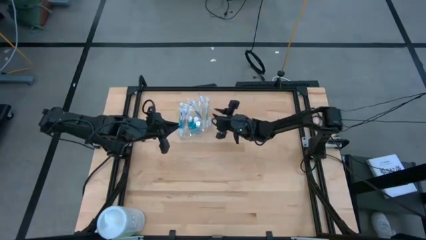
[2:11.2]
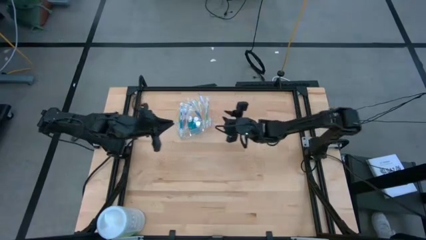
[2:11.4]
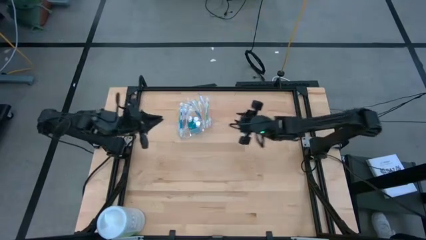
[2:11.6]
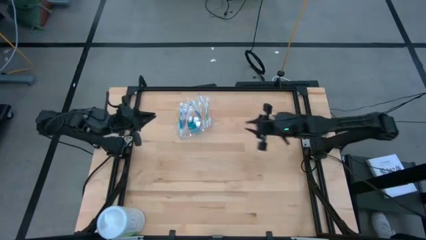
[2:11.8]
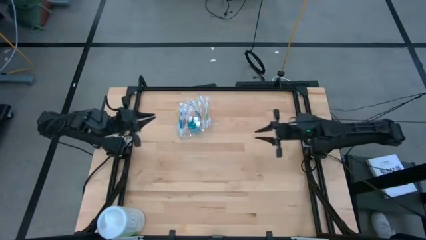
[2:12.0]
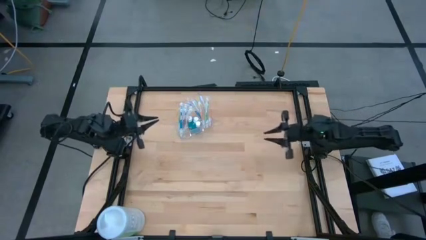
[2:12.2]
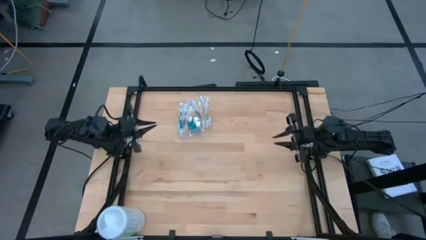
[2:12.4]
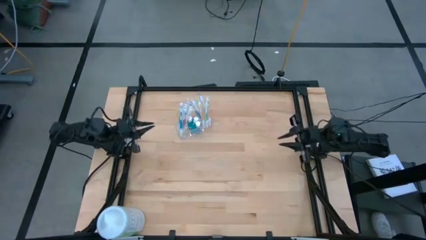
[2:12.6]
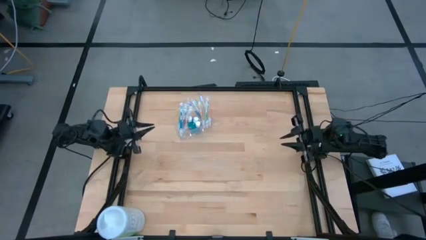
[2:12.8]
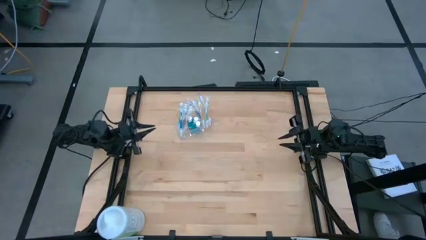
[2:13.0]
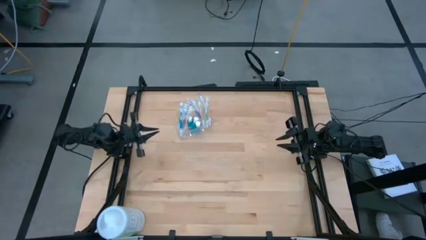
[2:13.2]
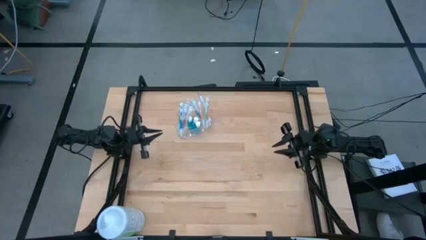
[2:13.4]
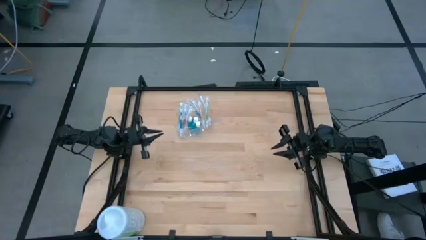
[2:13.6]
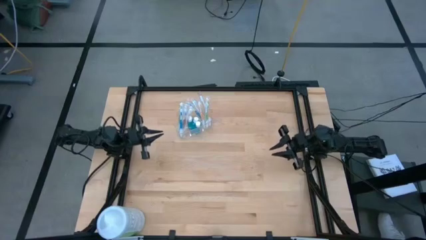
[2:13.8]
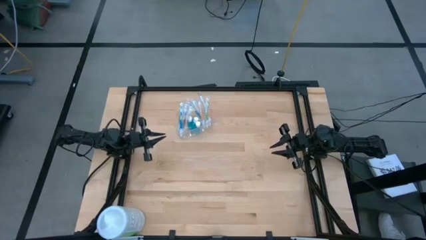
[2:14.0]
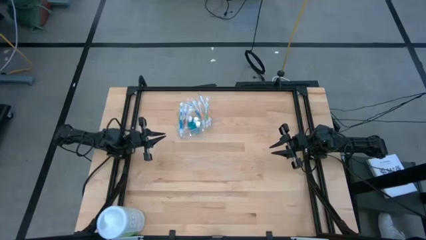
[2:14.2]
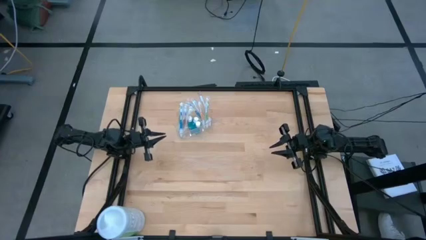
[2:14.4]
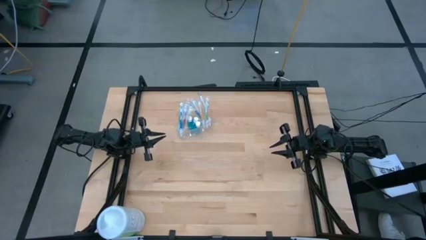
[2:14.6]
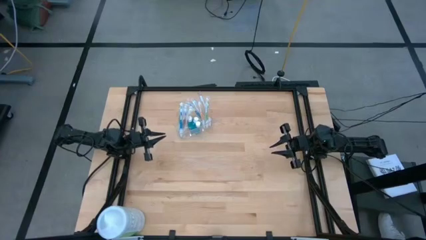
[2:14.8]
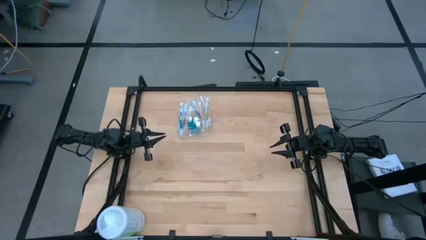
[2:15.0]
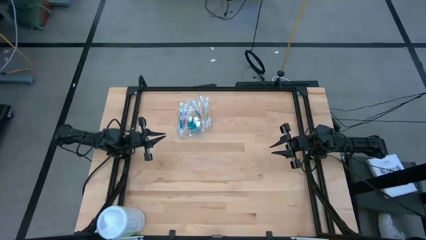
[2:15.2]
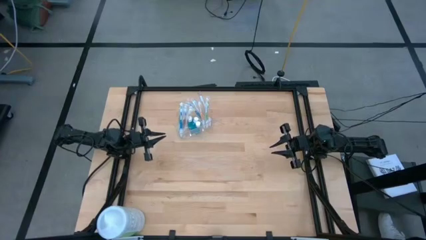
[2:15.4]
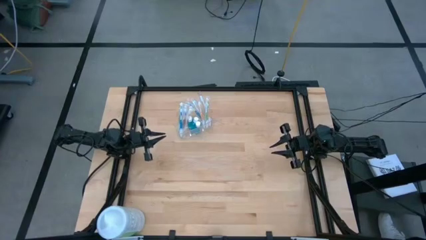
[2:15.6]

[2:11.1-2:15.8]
Task: Pick & Place toothbrushing station
Return to Home Position

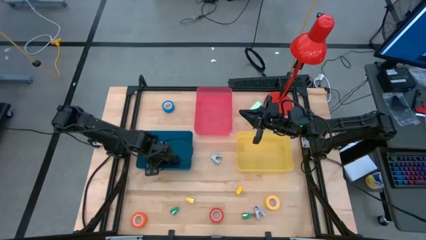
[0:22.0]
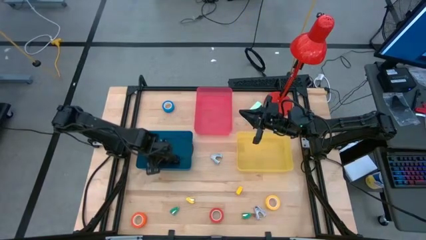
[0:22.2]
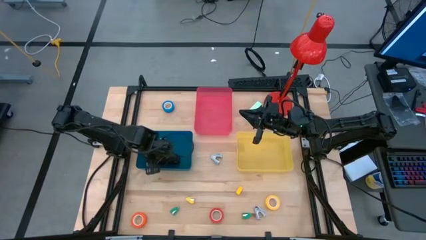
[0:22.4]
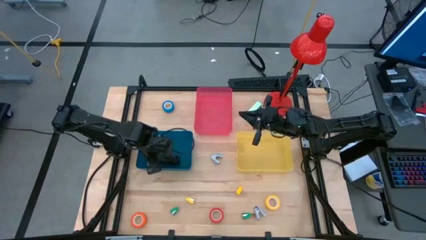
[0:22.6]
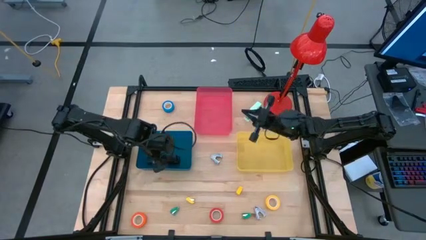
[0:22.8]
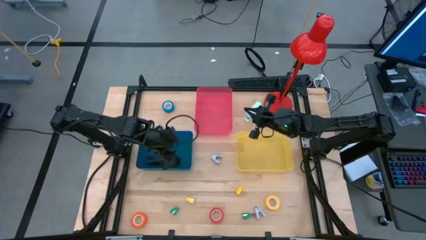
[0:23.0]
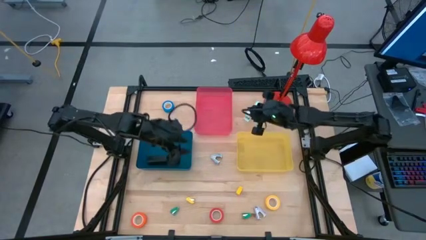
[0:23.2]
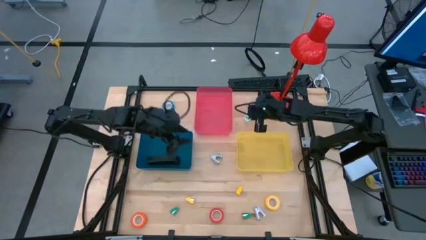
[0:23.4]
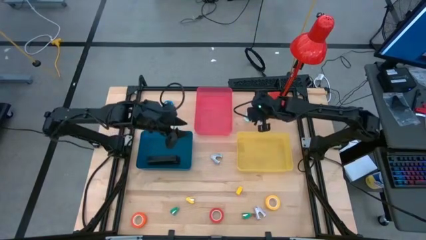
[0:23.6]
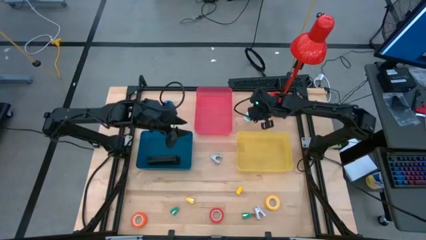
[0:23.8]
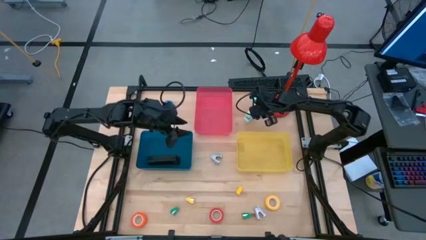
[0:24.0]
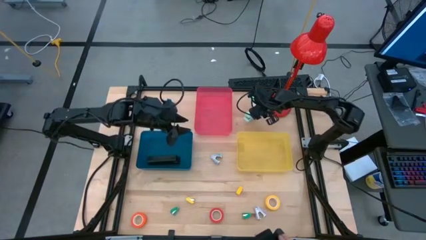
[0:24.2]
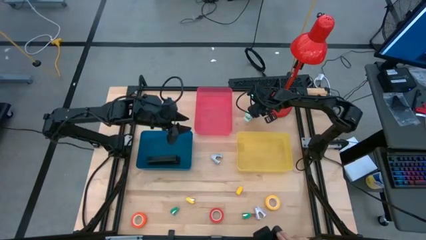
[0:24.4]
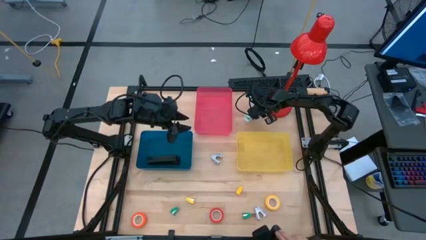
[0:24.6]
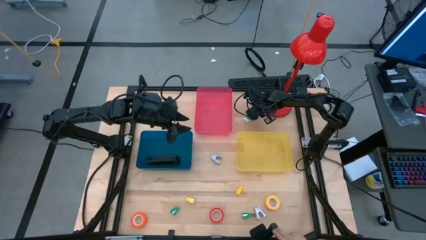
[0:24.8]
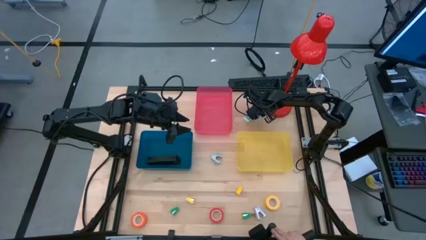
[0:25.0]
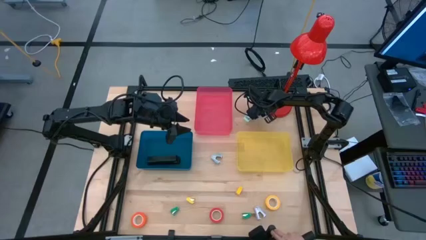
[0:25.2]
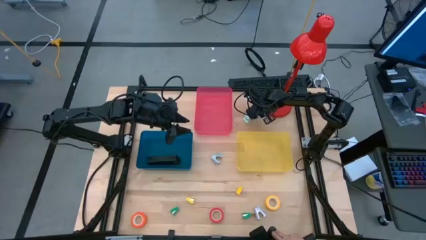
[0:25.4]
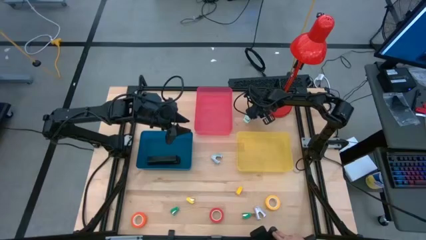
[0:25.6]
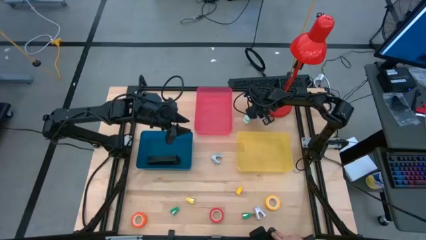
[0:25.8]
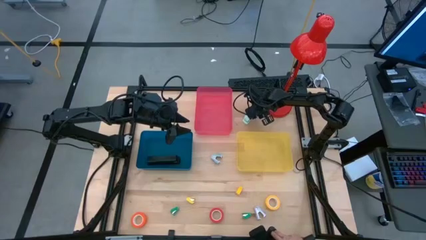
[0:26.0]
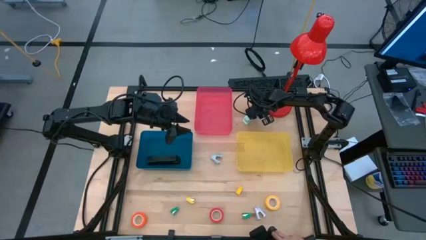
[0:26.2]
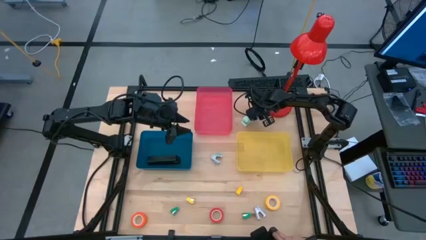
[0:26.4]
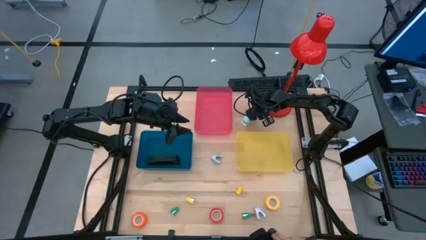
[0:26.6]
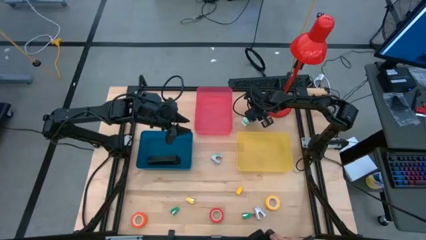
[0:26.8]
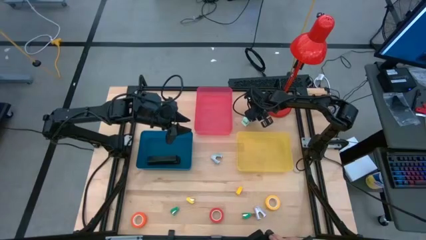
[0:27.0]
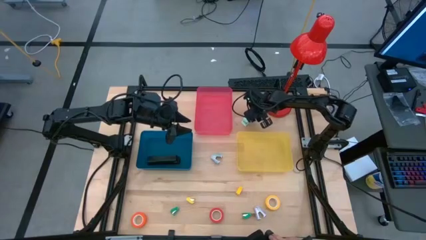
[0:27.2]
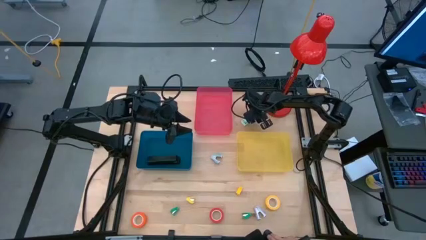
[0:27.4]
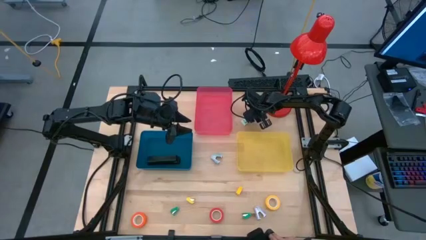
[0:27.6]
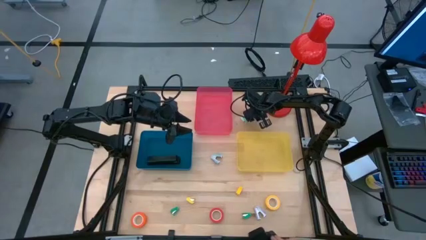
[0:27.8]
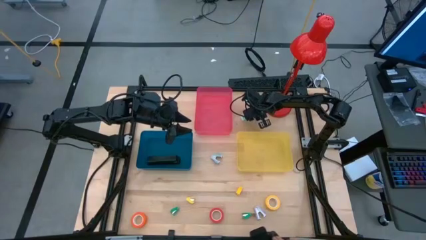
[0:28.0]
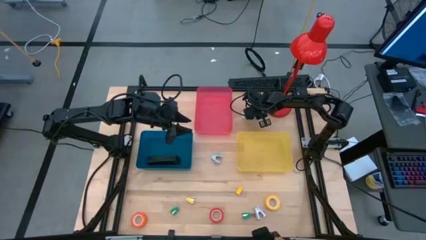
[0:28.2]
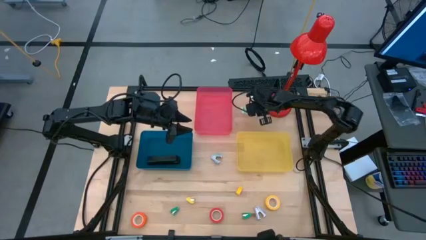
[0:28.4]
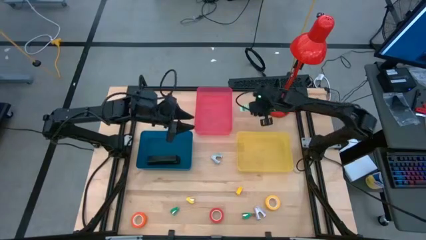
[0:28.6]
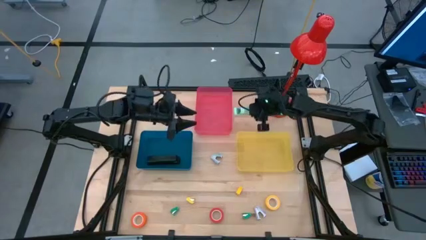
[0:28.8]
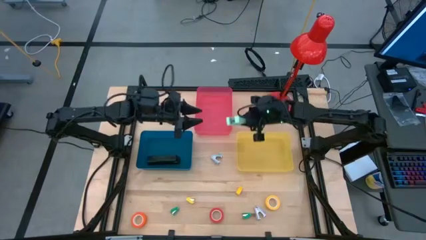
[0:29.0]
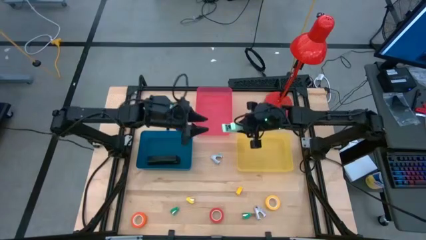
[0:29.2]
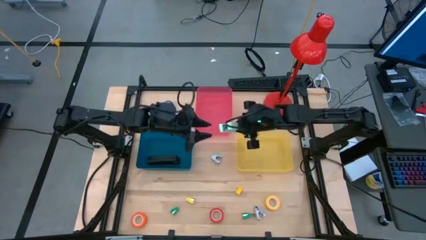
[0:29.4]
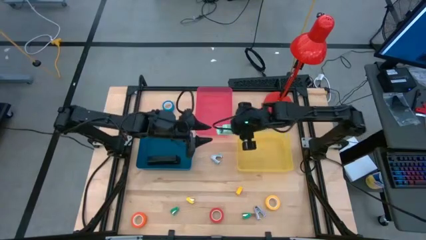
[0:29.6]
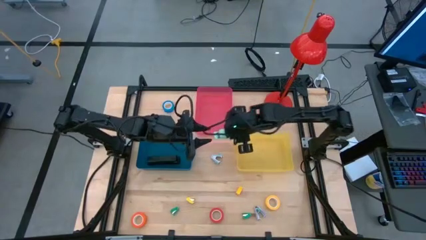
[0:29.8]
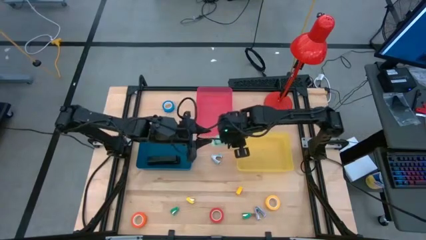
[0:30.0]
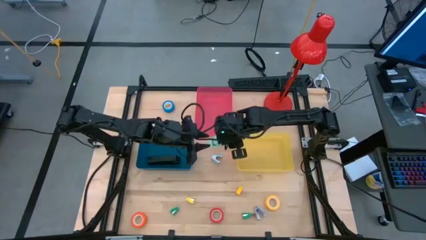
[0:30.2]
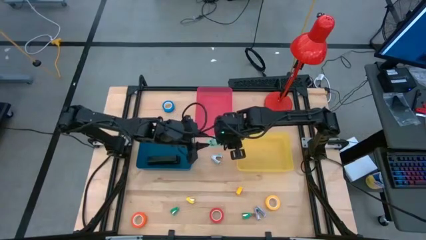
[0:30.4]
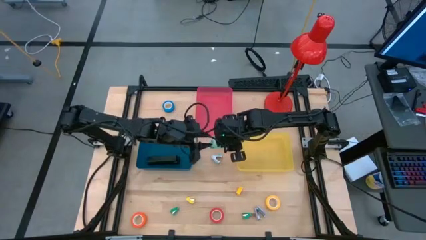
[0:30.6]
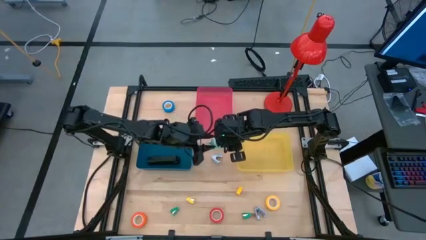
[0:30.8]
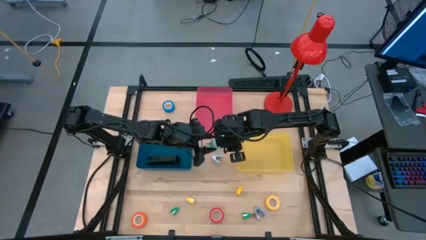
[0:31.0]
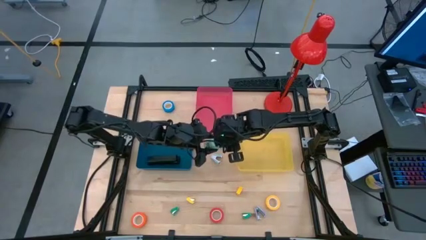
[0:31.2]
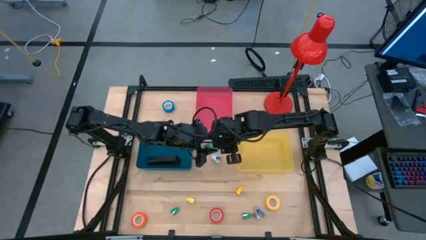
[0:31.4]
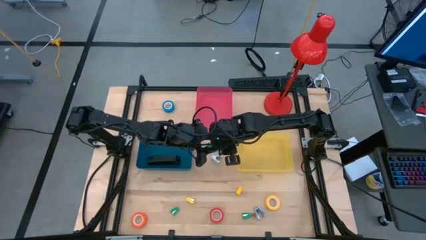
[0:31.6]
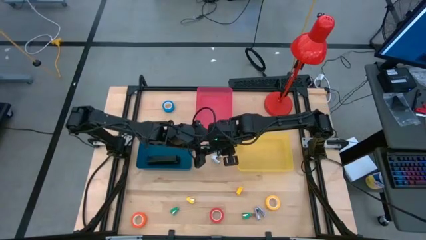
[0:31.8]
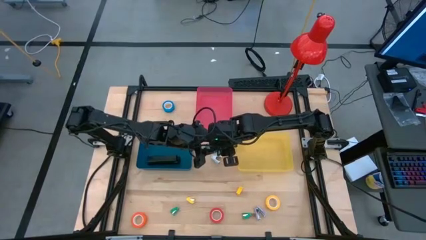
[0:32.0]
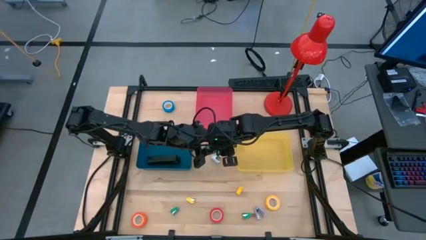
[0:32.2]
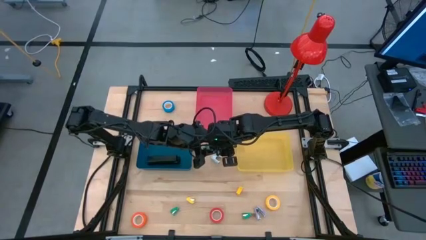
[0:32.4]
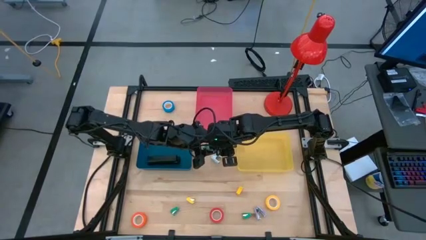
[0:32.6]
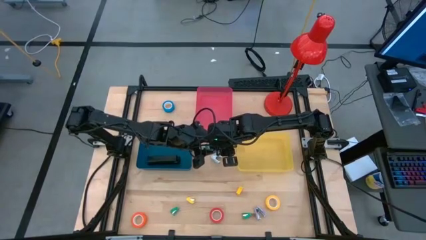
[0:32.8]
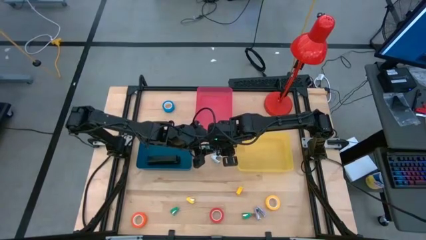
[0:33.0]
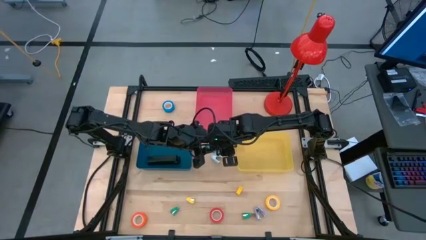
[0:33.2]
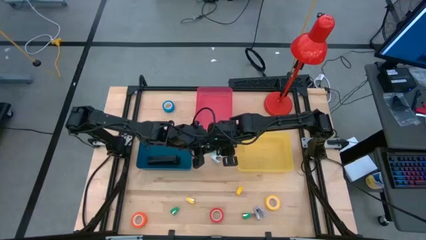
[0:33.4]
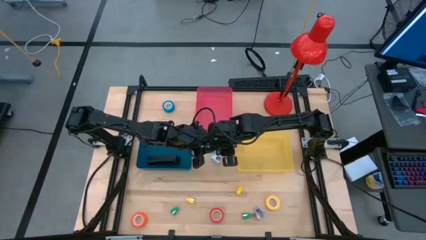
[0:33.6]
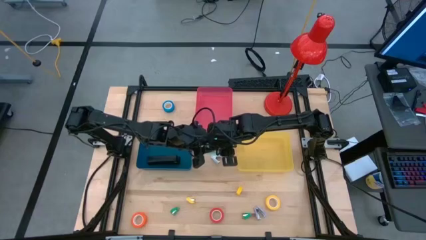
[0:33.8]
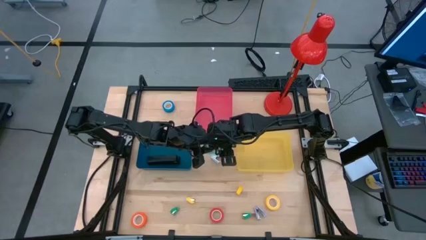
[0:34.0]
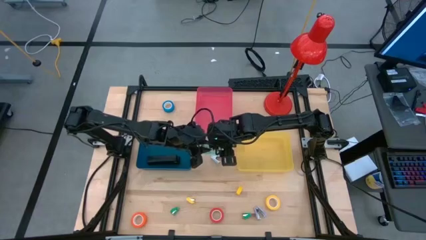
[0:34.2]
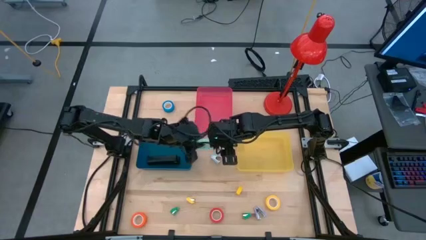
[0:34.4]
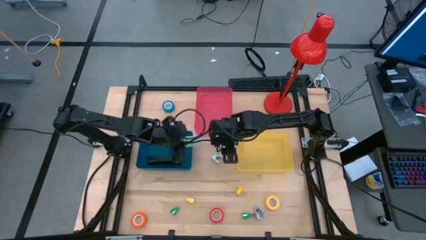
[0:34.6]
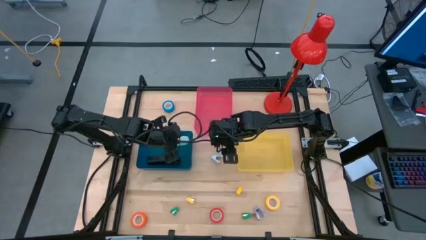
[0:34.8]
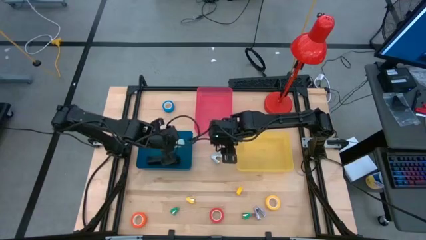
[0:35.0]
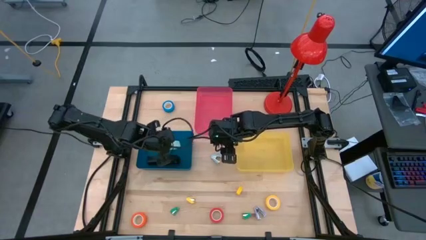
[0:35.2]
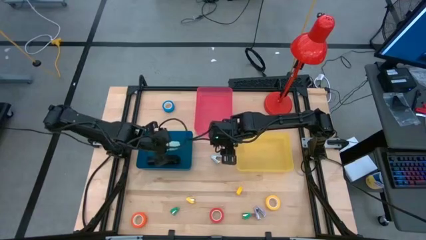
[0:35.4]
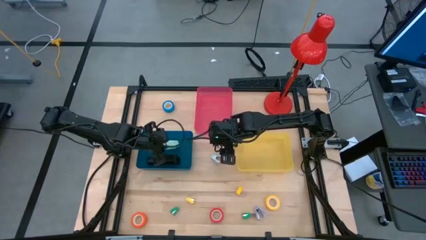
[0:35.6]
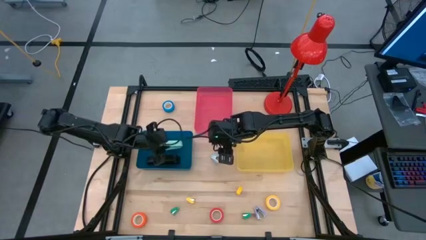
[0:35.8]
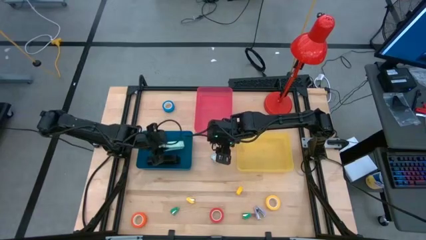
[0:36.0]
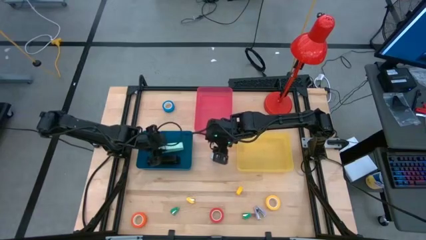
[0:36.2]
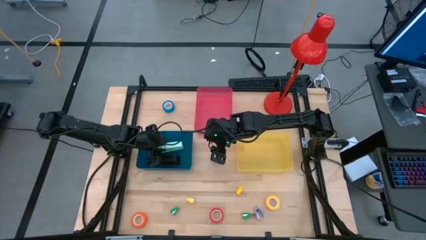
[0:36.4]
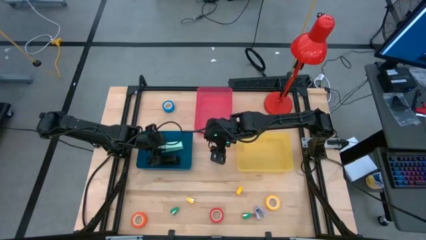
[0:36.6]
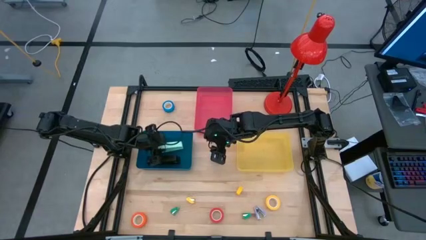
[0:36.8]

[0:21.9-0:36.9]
Task: Pick and place Stapler, Stapler remover, tape
Put the white stapler into the blue bin
